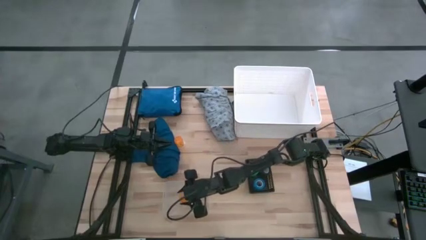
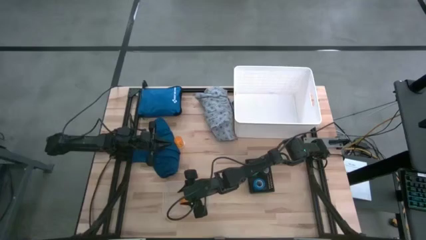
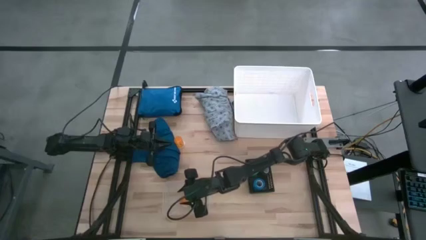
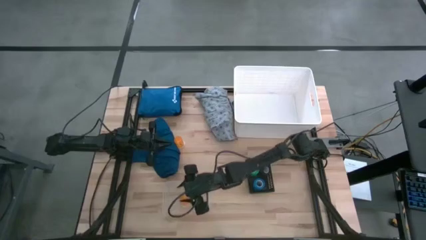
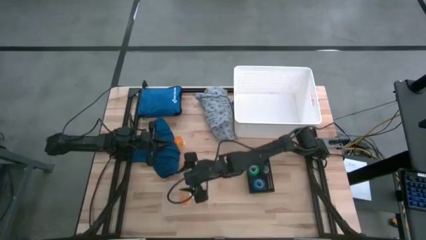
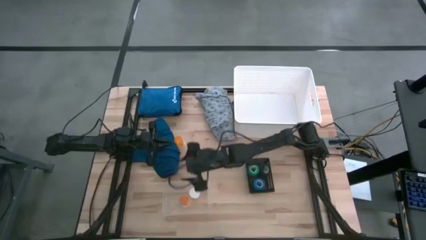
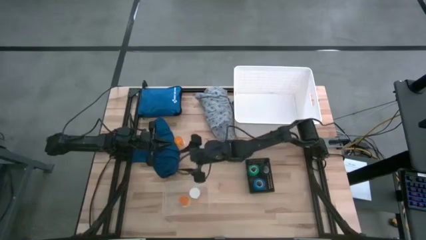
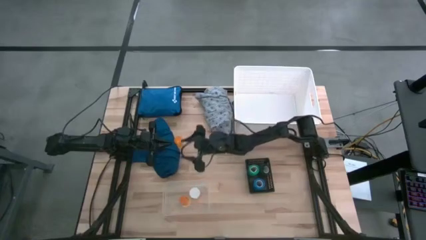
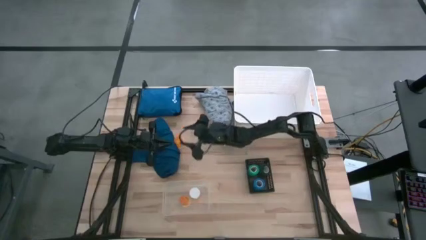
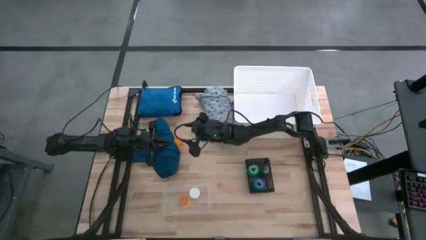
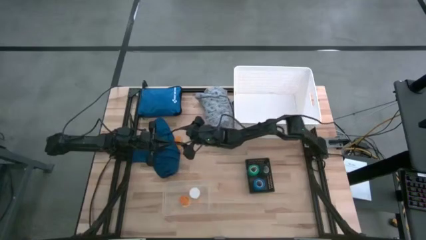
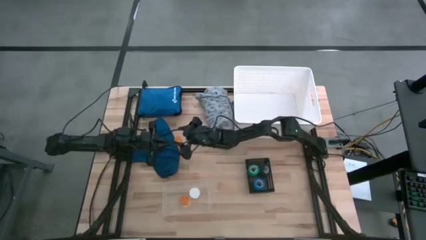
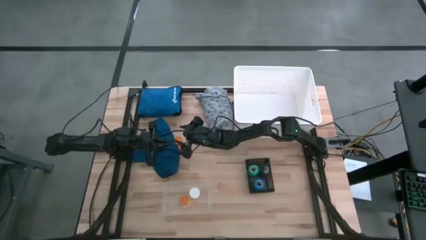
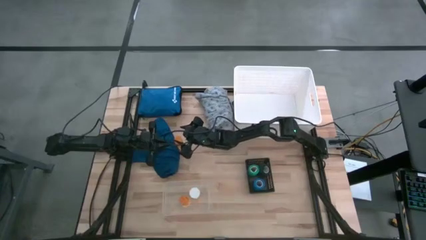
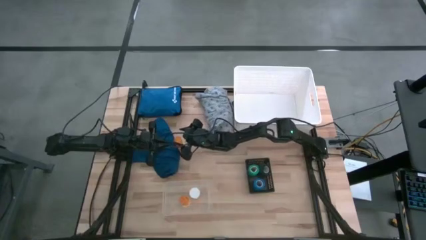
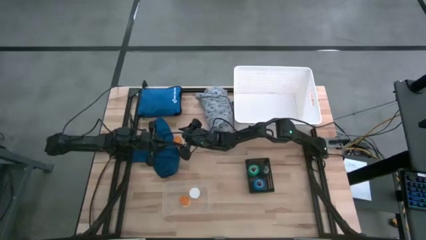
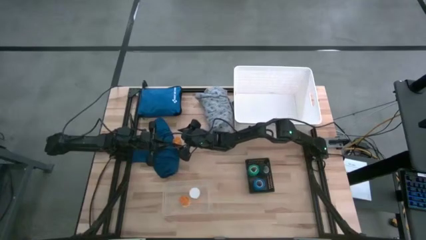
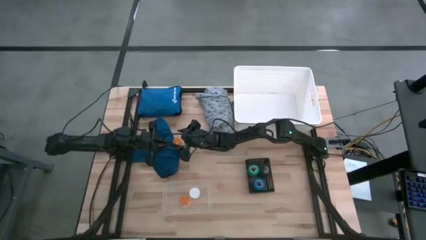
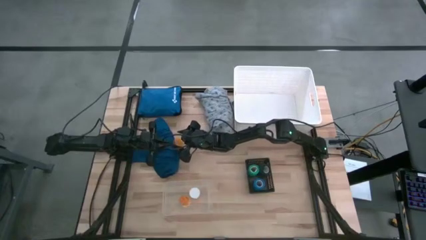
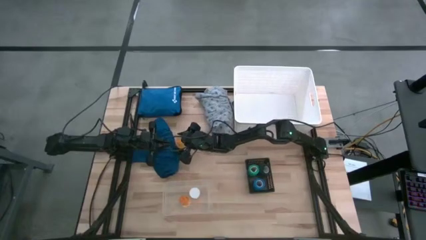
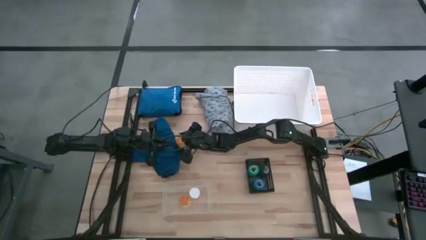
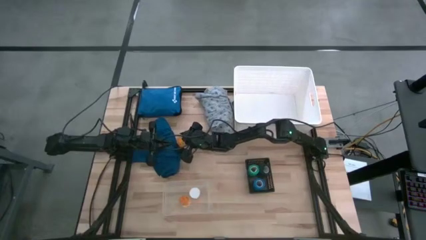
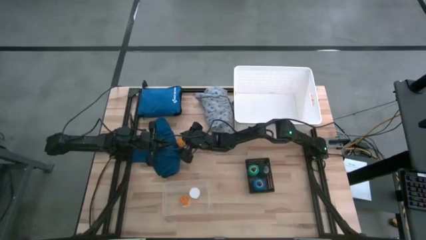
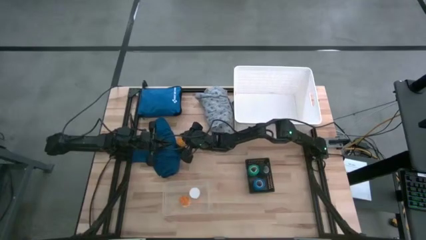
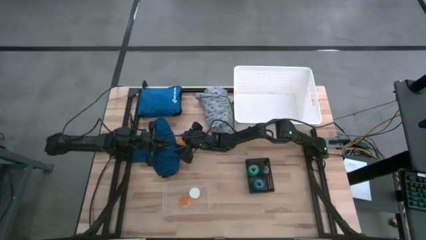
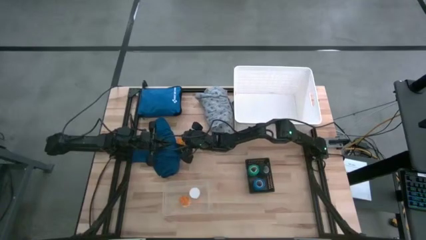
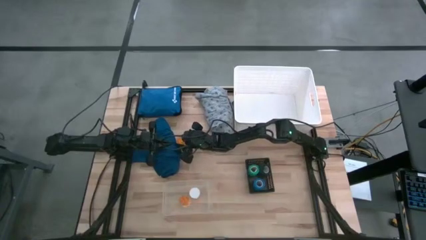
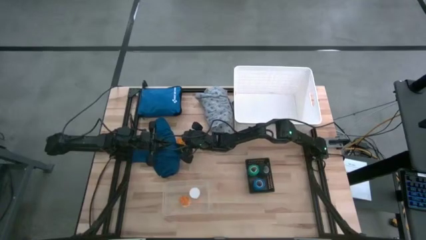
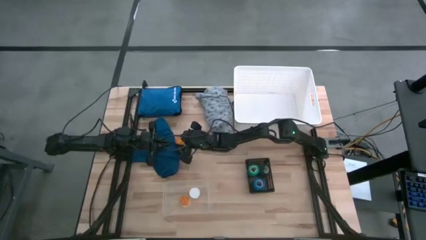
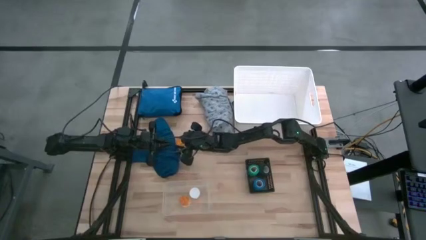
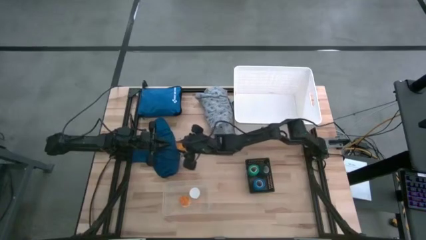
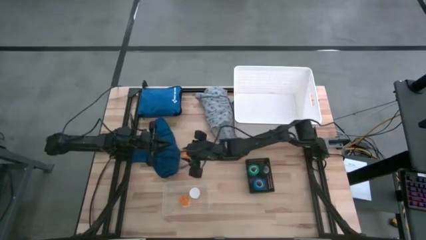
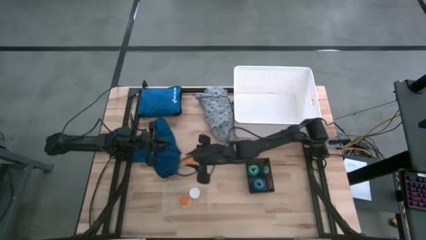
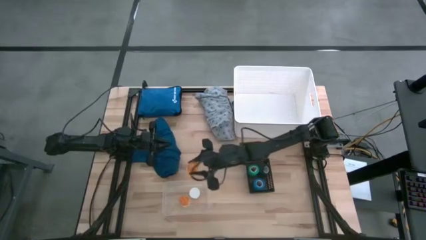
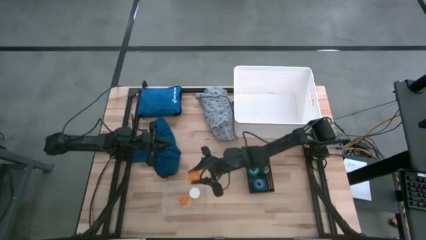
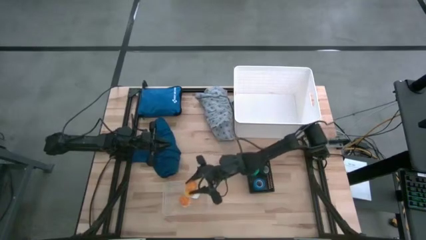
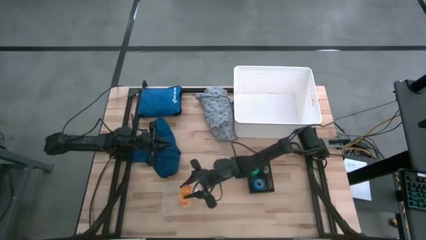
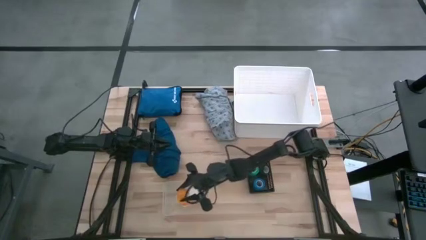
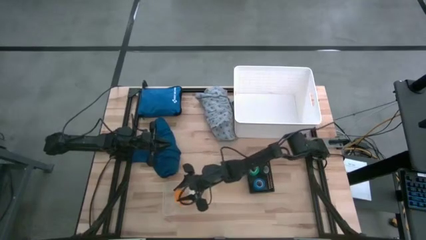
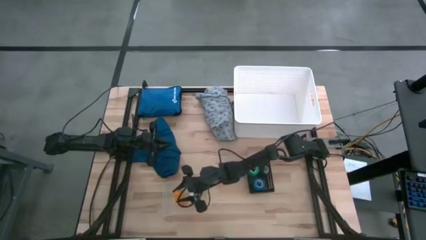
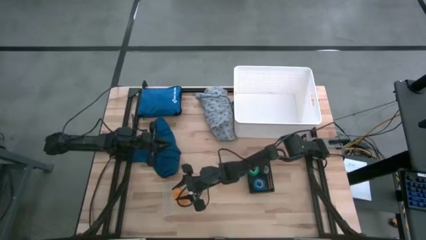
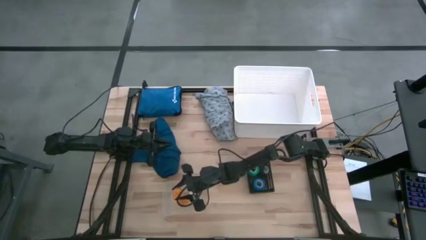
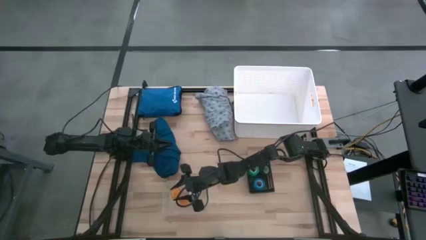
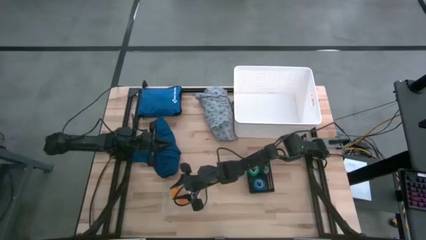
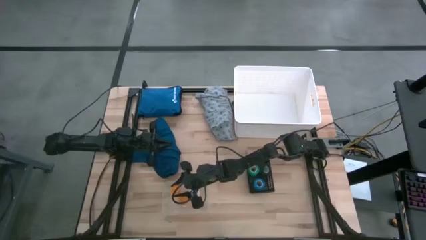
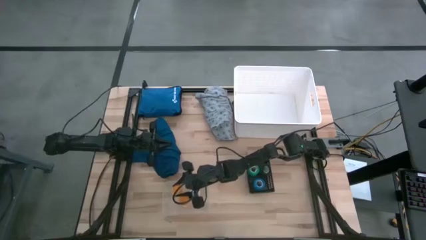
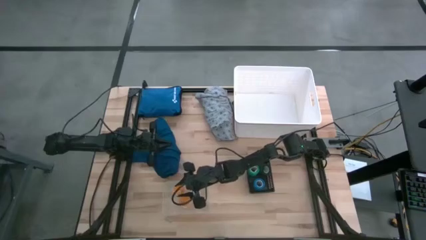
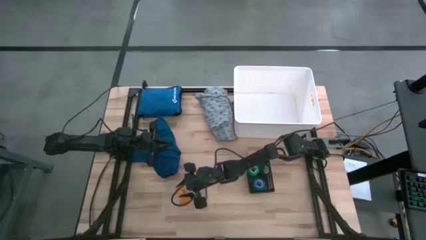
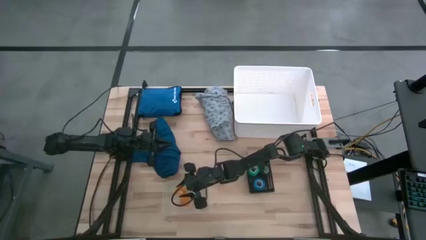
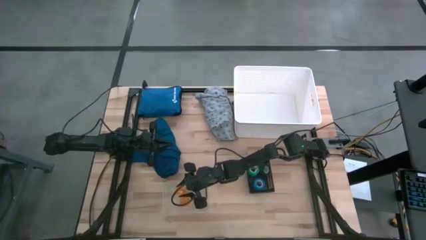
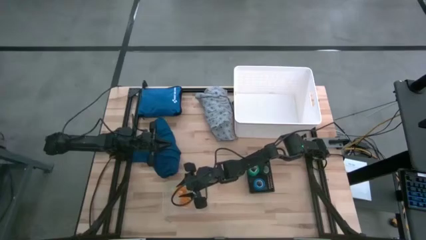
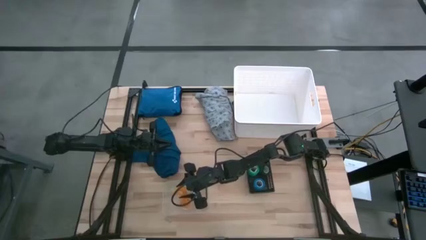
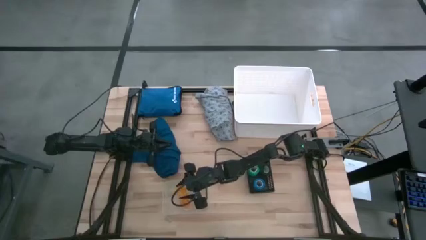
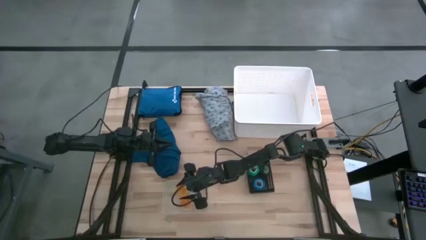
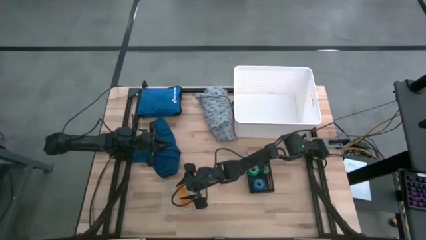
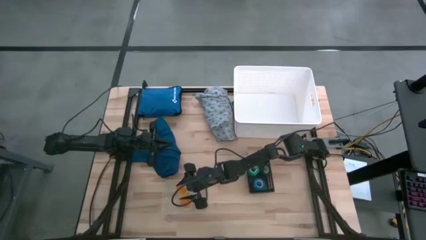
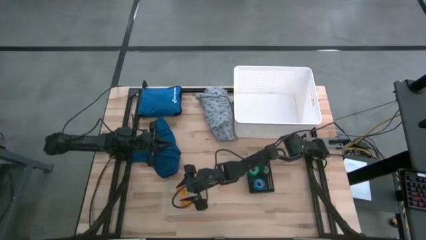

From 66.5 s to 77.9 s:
Task: Pick & place medical supplies in basket/bin
Put the orange pill bottle into the transparent bin

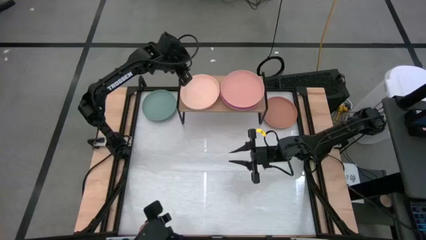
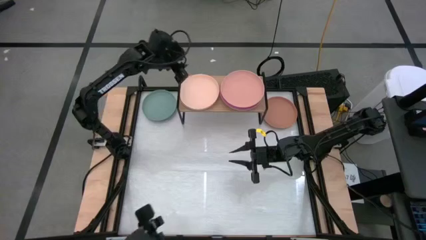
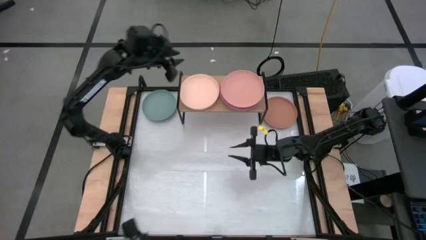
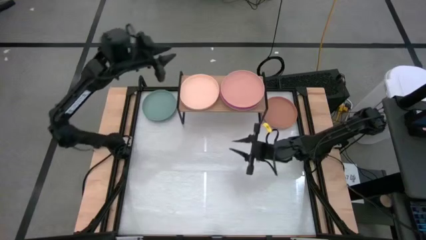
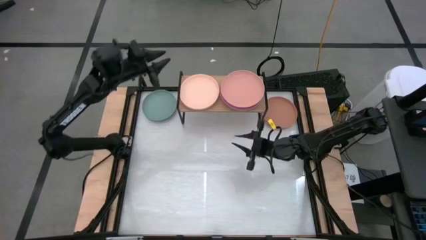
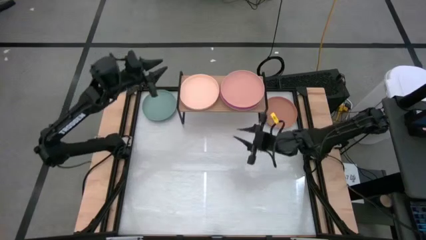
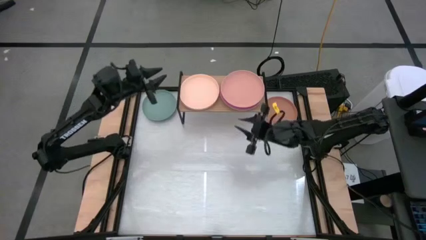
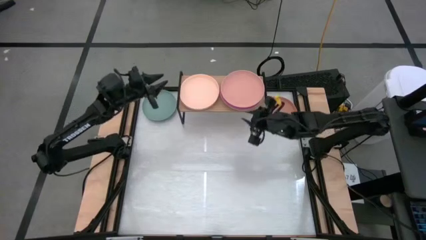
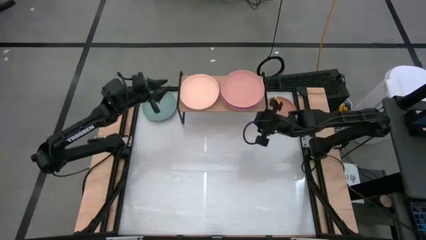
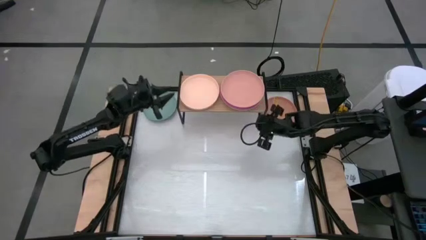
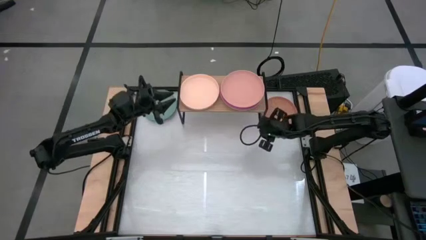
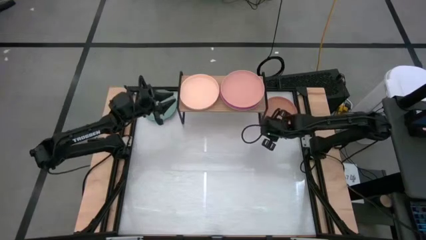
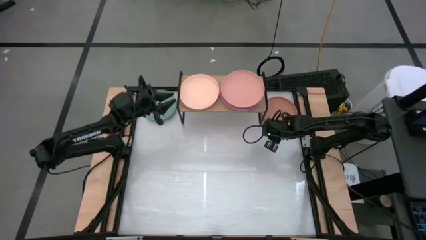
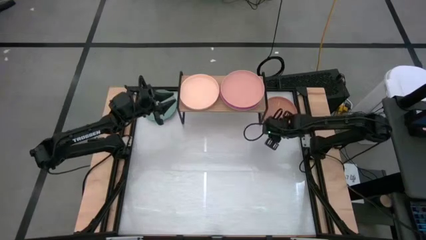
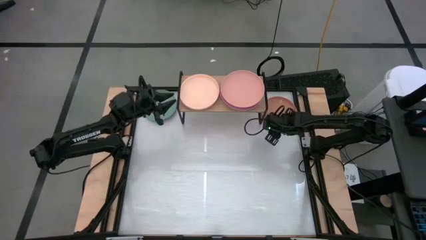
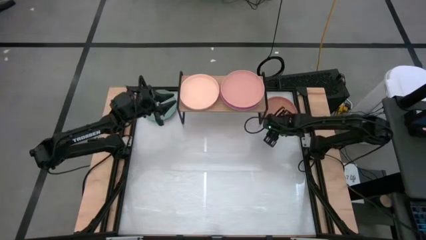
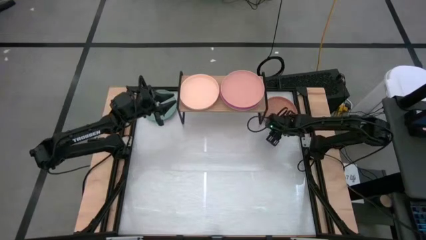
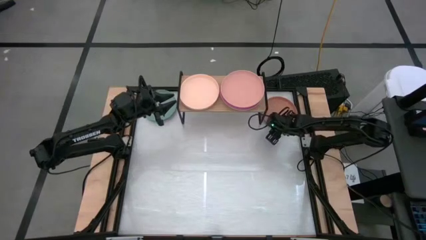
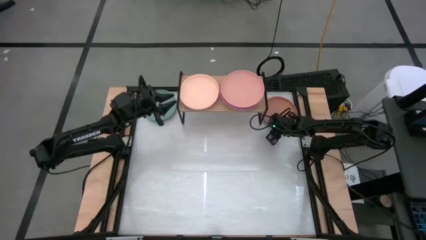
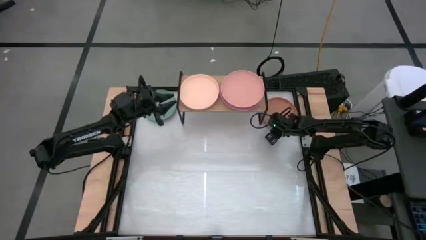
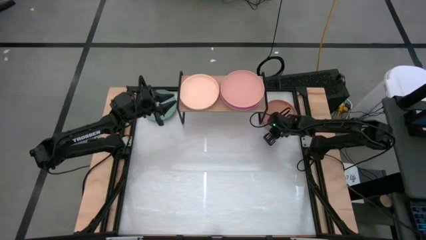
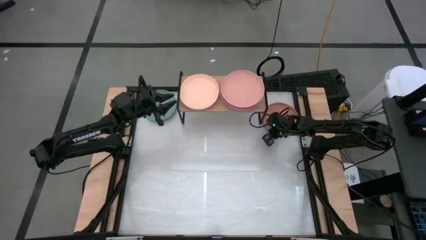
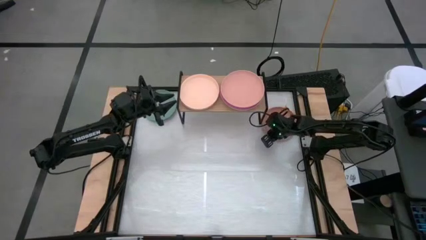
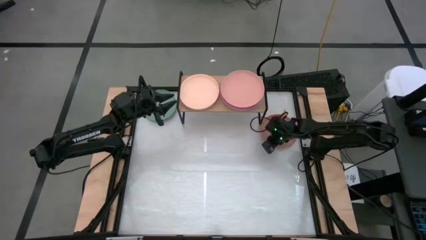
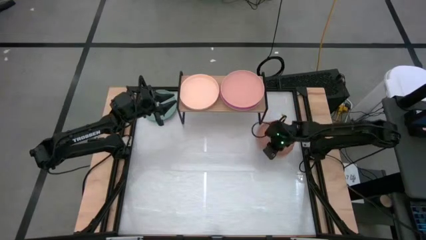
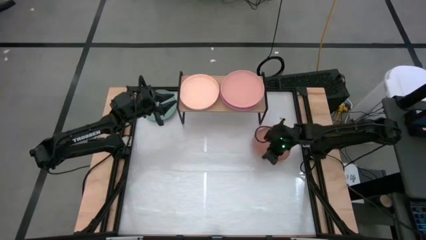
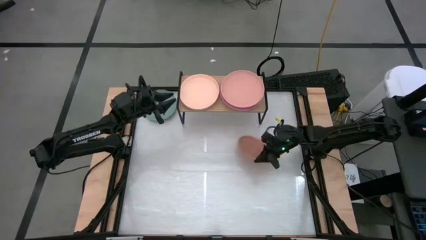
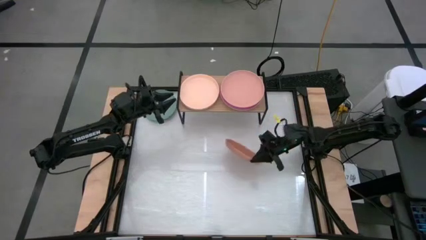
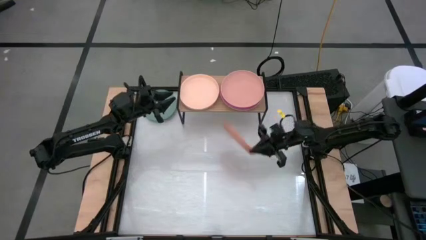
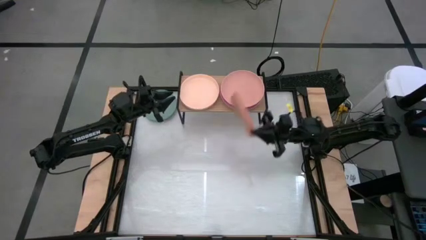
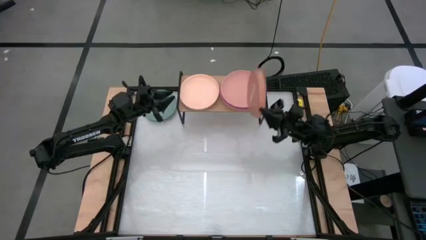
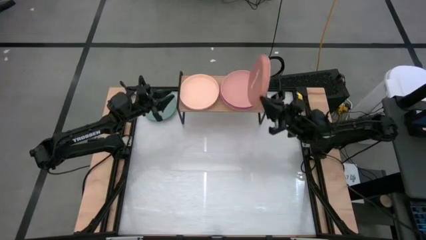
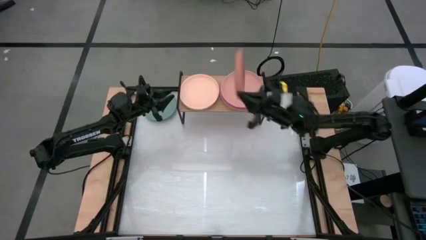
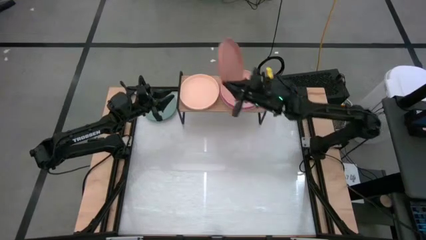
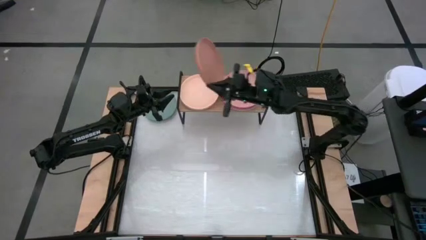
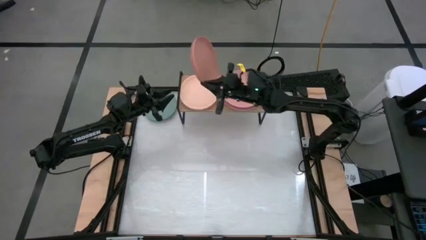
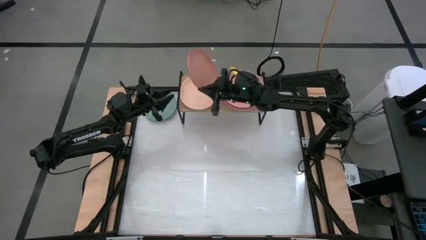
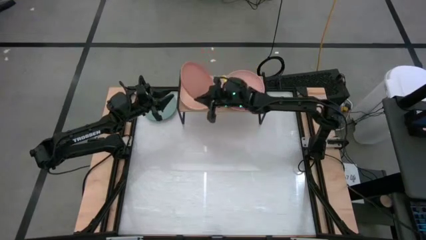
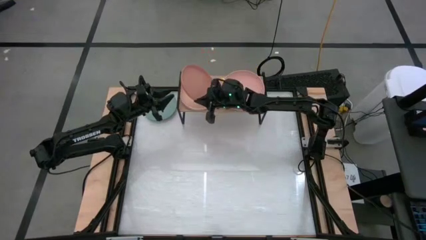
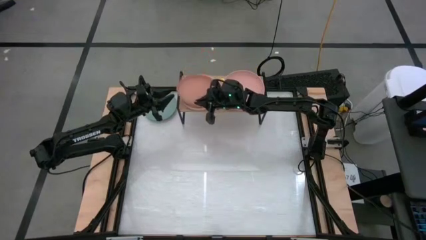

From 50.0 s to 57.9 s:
Task: Place and stack plates onto a shelf
Stack the dark brown plate on top of the light orange plate on the shelf
